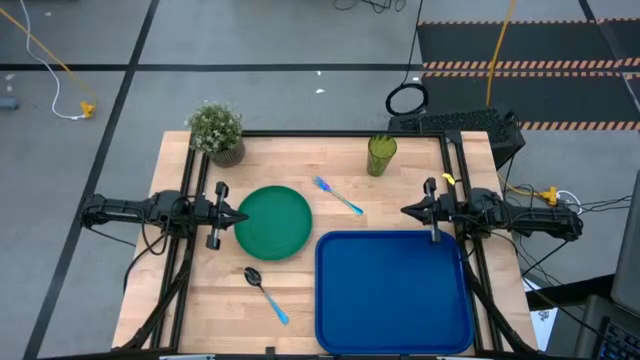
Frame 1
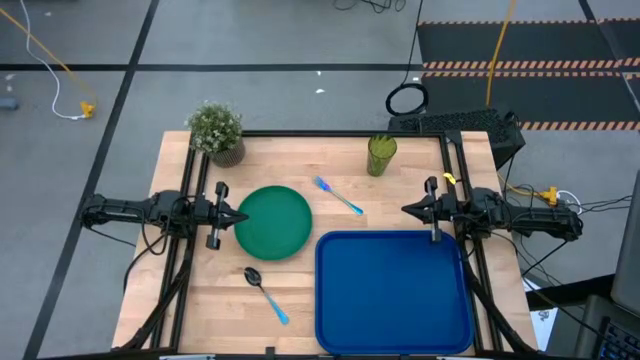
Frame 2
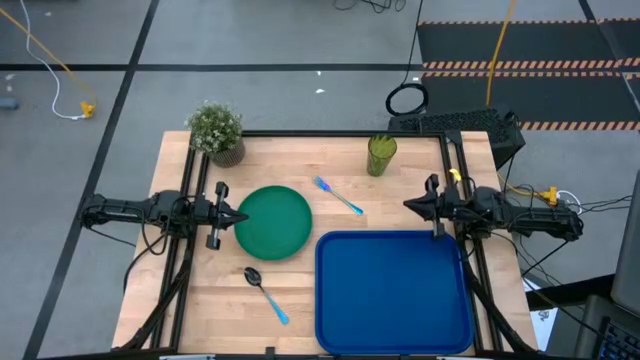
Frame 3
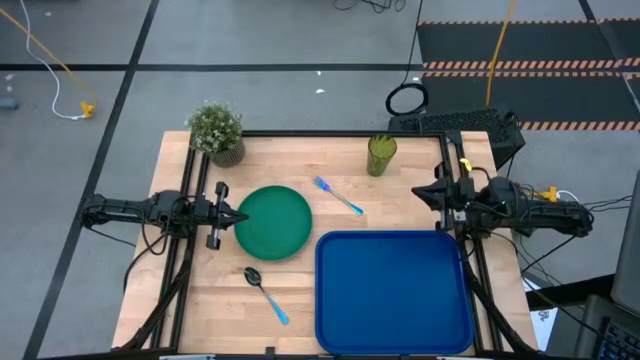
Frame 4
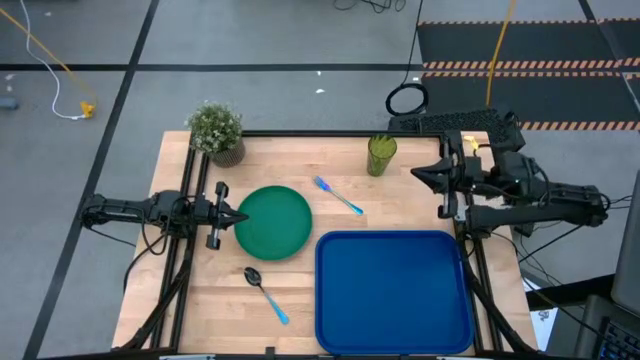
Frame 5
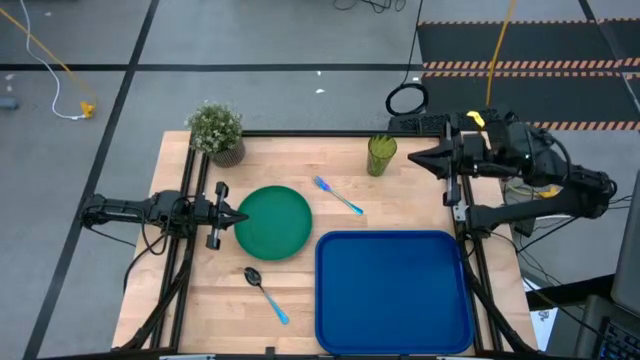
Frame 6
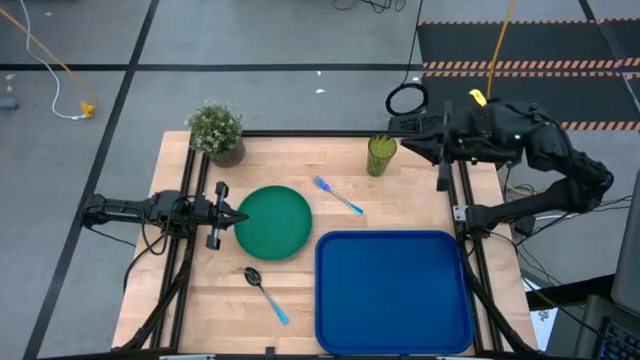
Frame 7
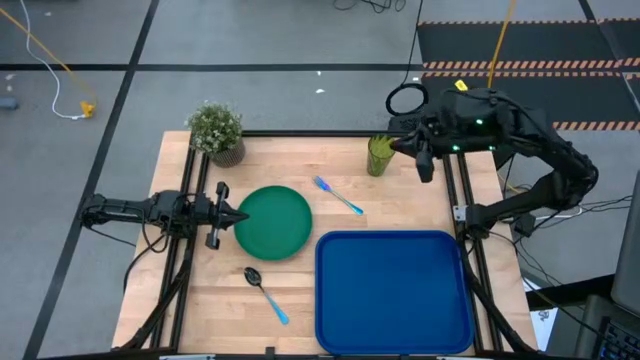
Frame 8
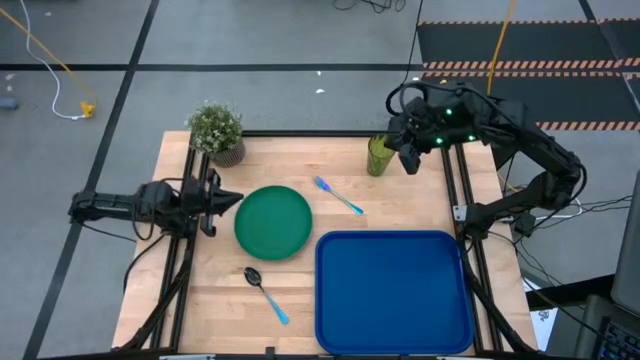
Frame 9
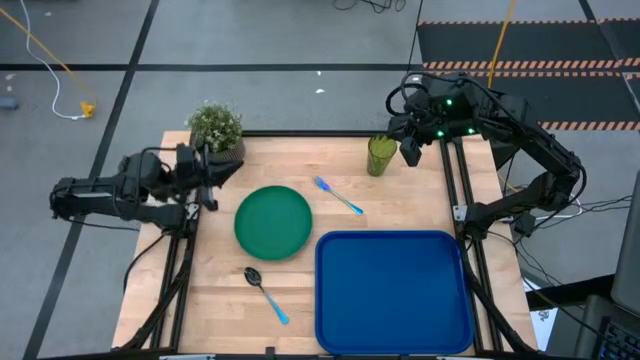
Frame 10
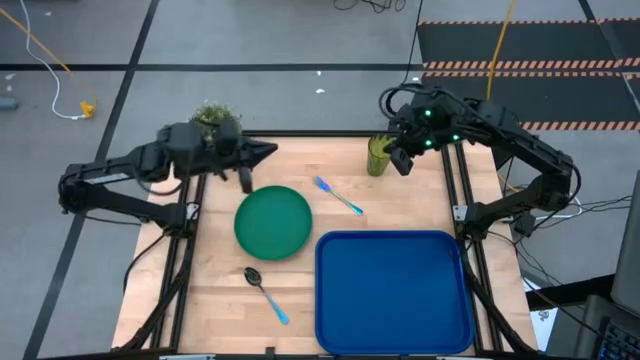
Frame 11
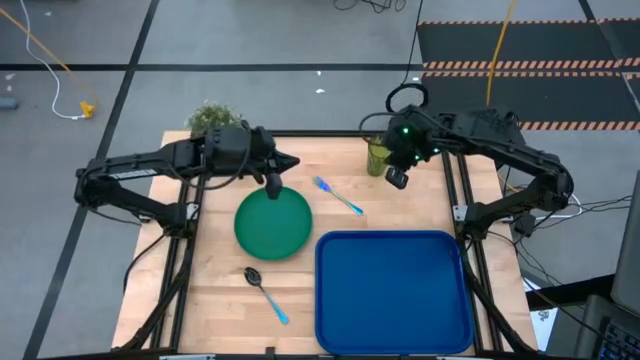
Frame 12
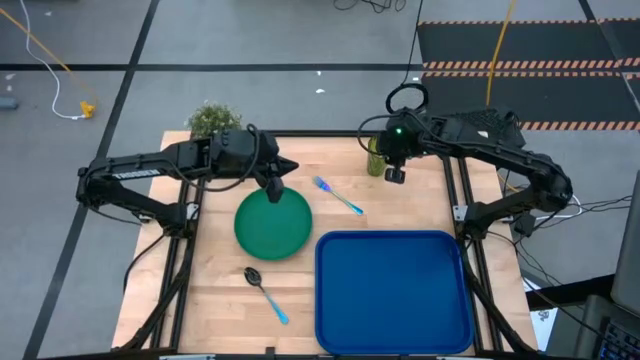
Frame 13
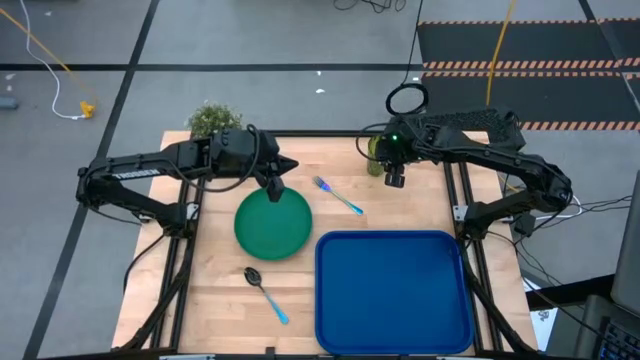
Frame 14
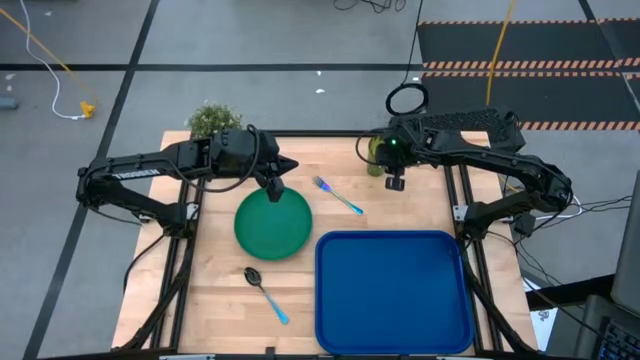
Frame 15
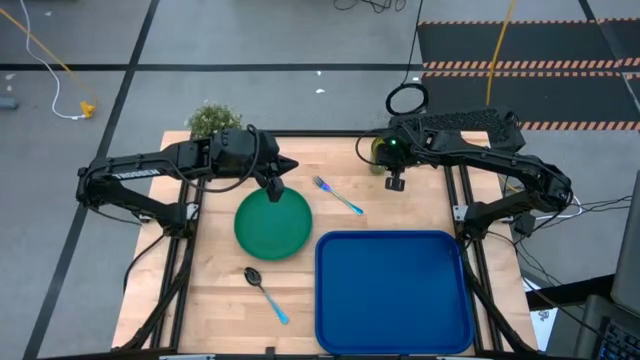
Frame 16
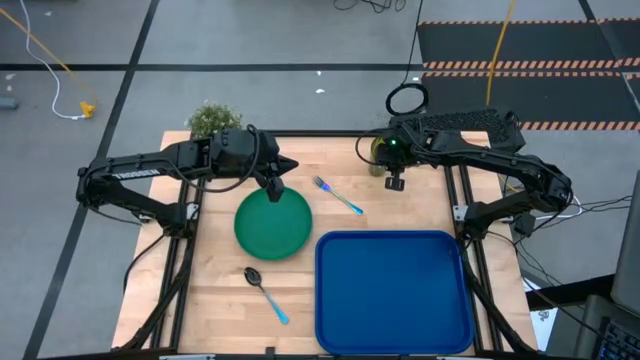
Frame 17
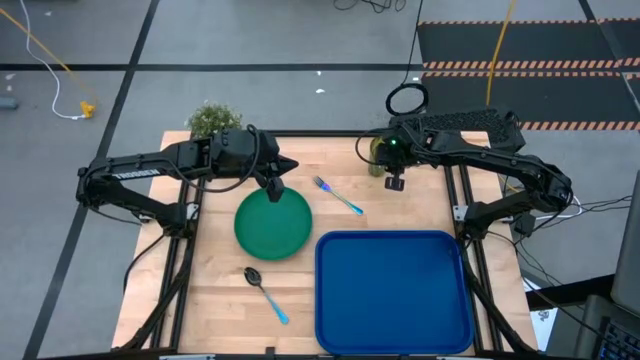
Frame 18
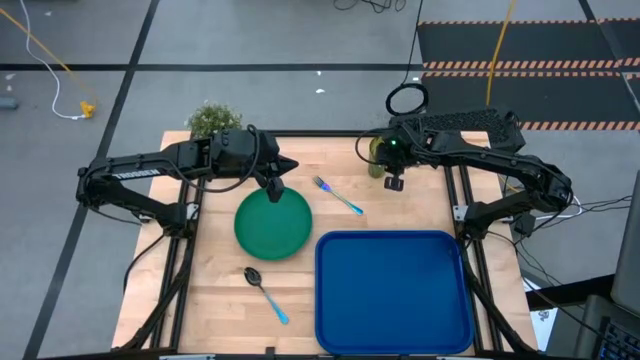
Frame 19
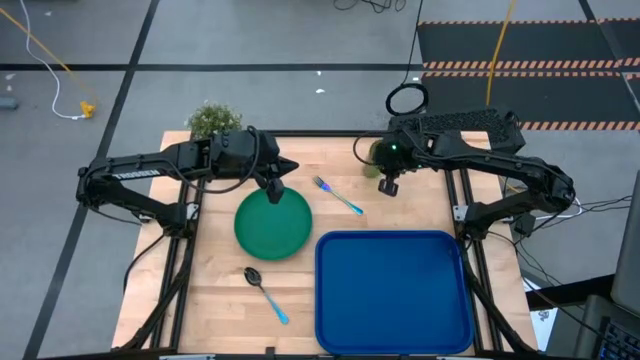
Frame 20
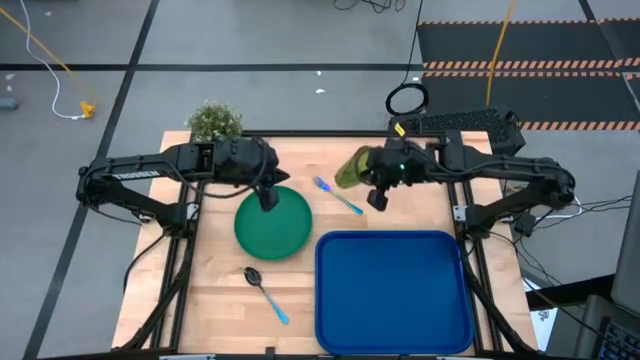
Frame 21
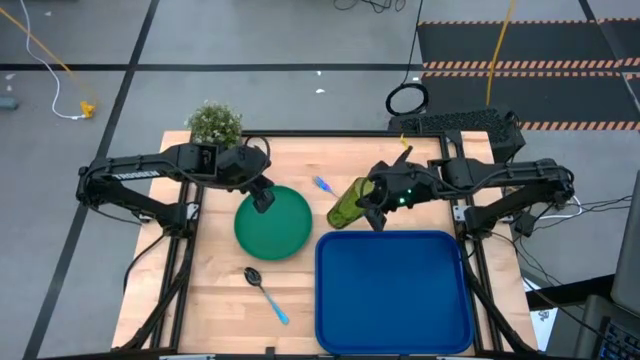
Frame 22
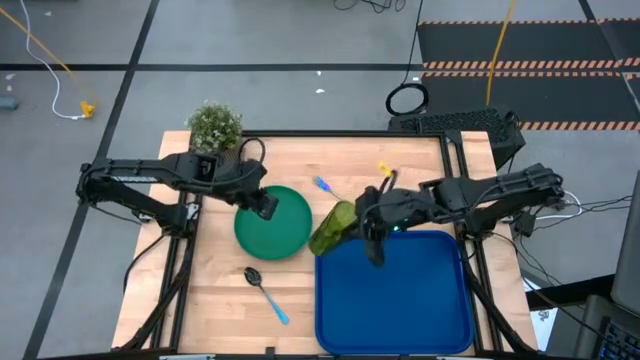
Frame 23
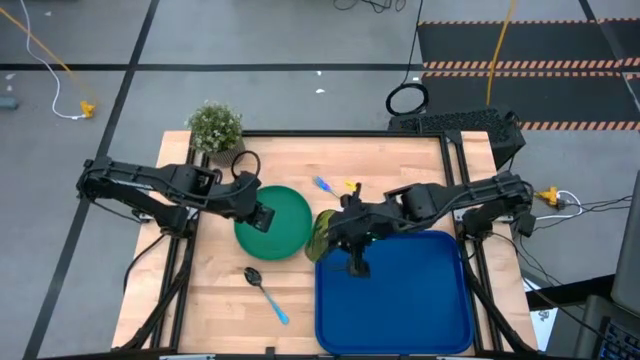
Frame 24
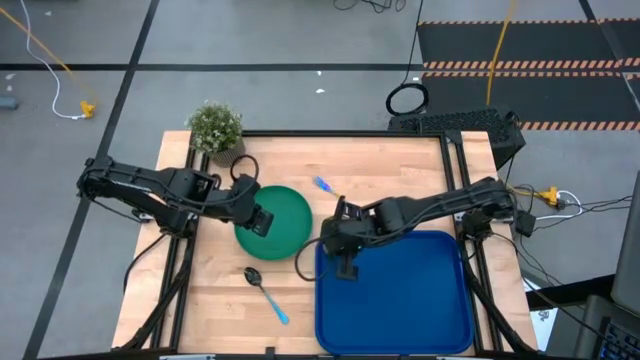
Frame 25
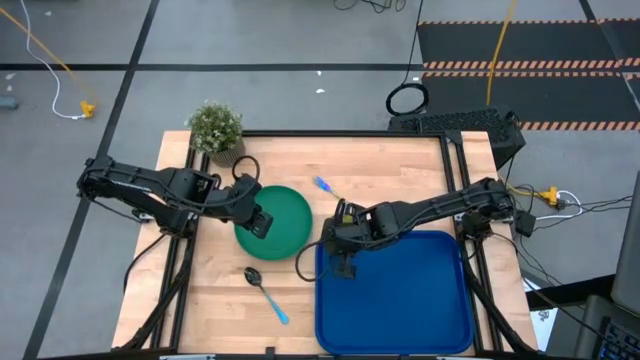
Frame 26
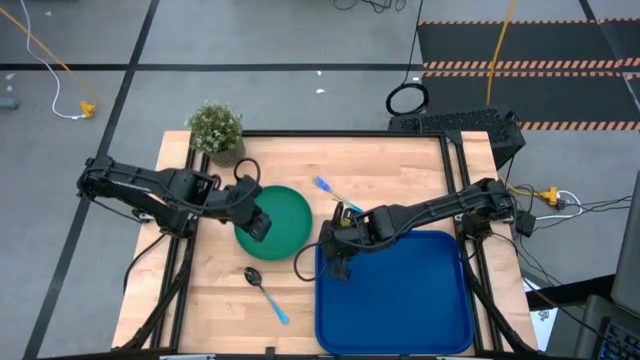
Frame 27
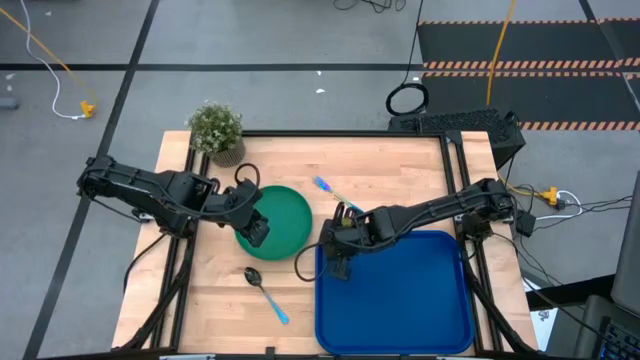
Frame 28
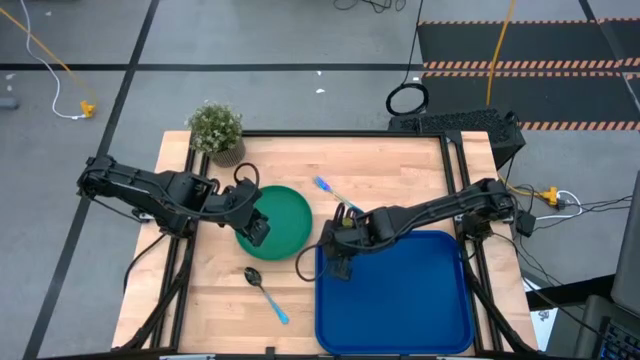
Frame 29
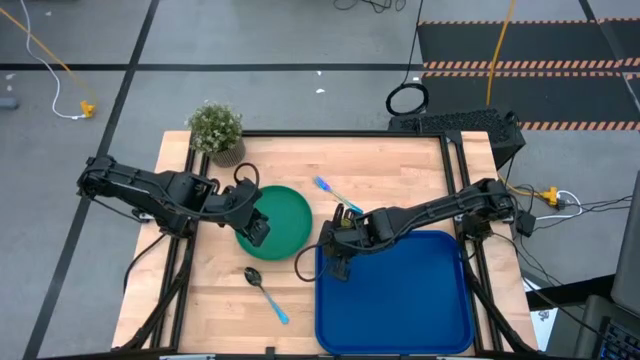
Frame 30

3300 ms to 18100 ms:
Task: Pick and place plate/cup/fork/spoon on tray
Put the green cup on the blue tray

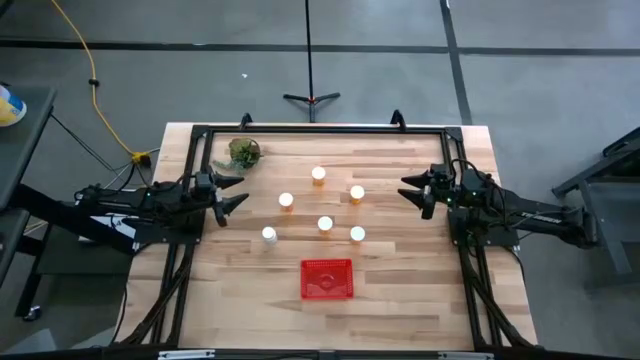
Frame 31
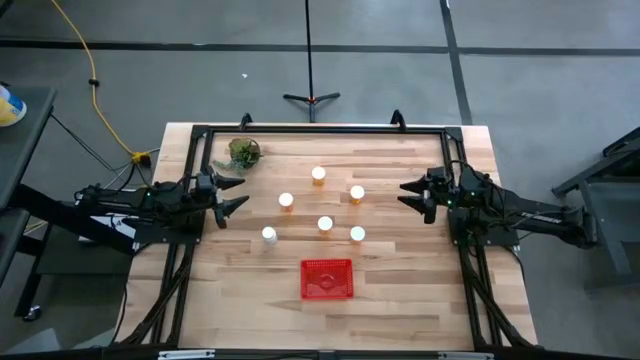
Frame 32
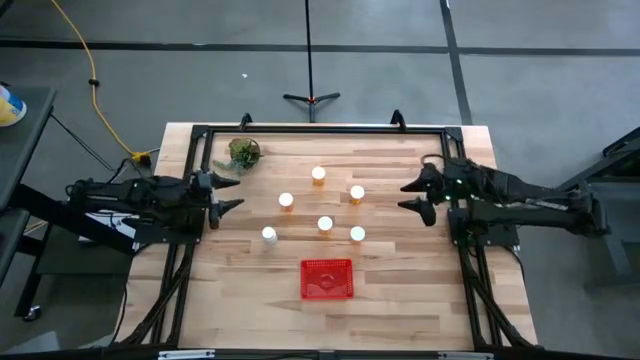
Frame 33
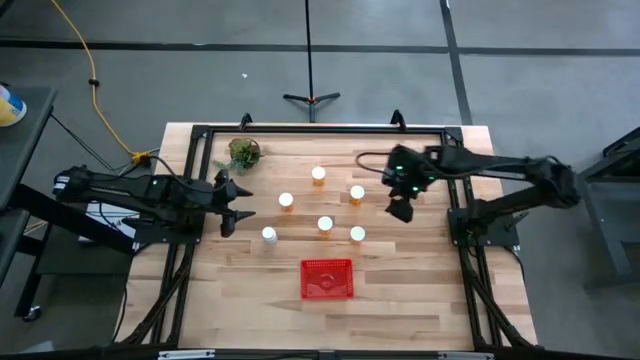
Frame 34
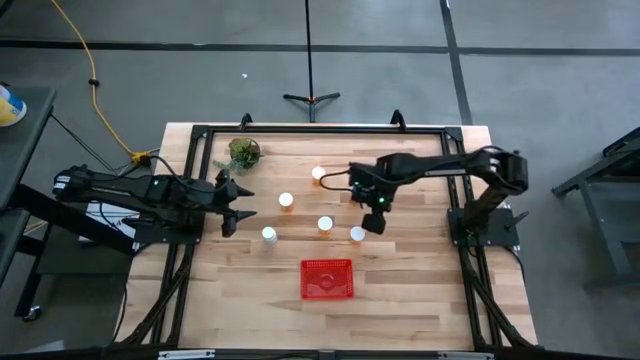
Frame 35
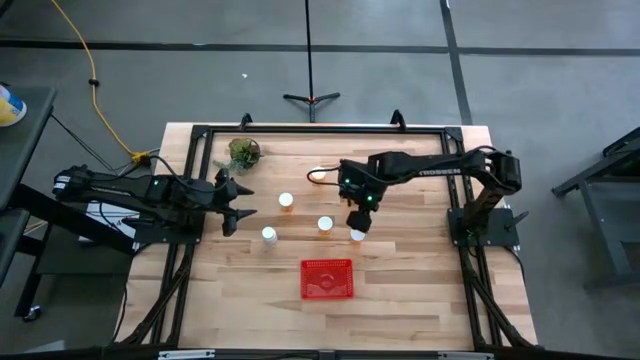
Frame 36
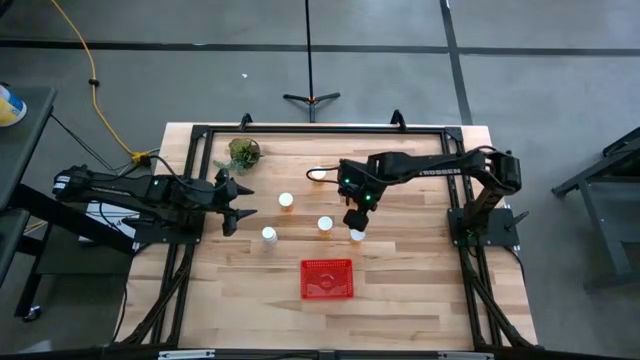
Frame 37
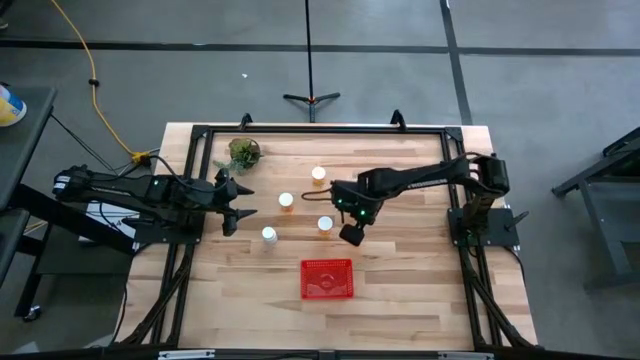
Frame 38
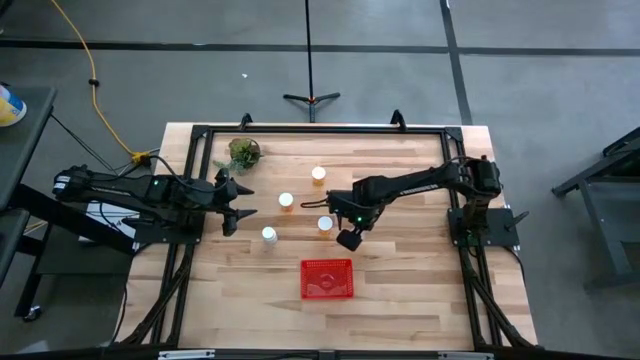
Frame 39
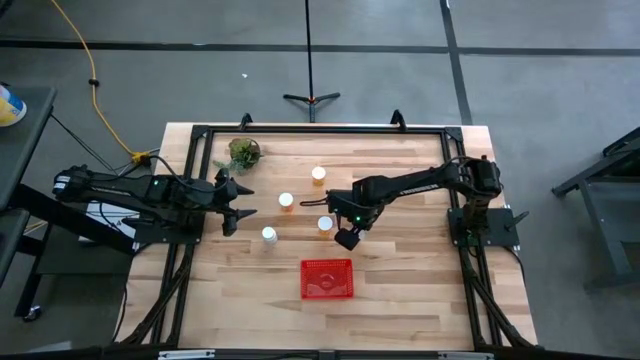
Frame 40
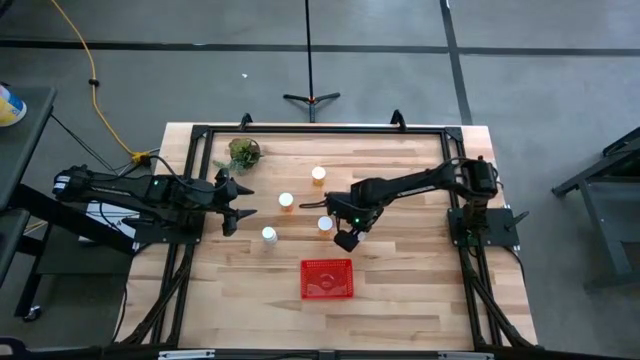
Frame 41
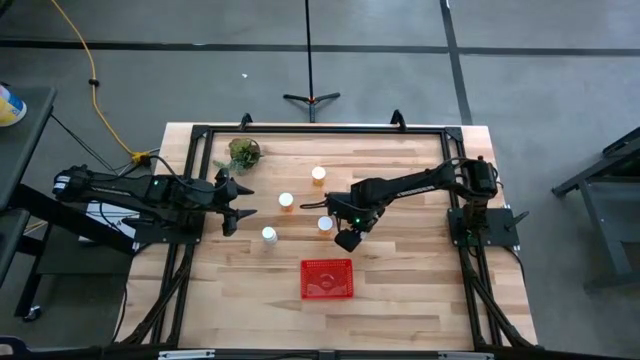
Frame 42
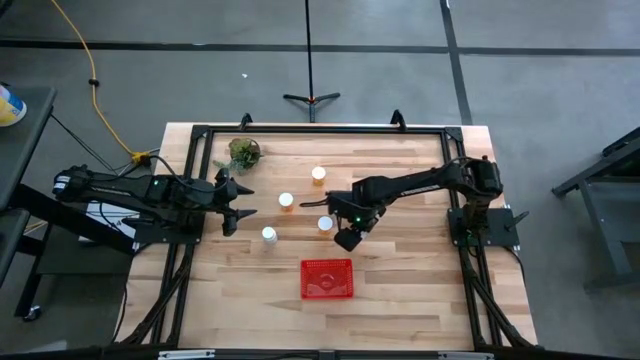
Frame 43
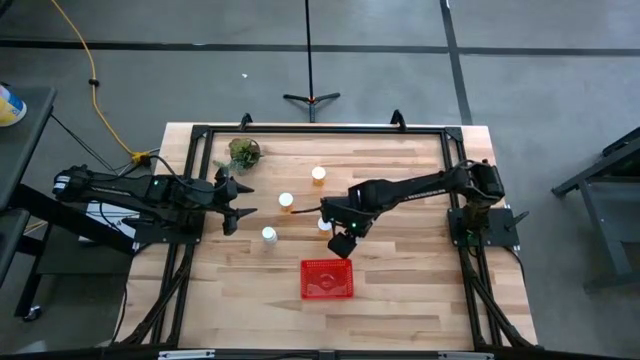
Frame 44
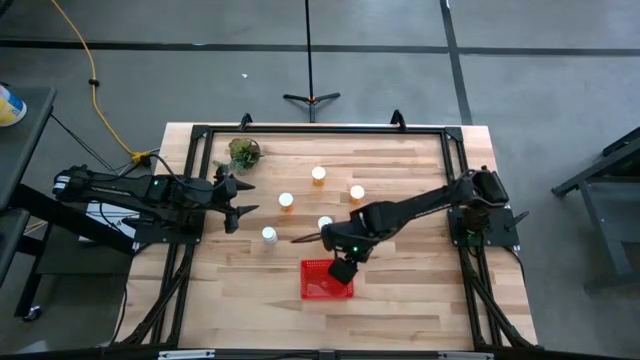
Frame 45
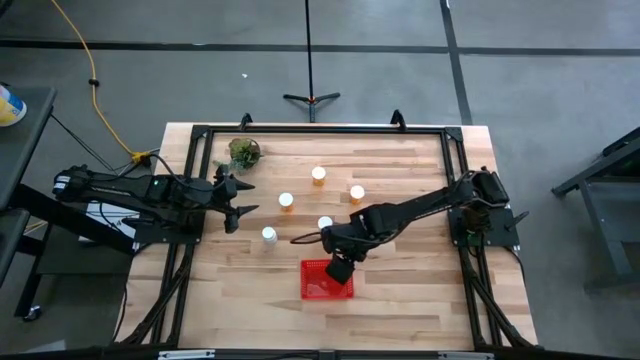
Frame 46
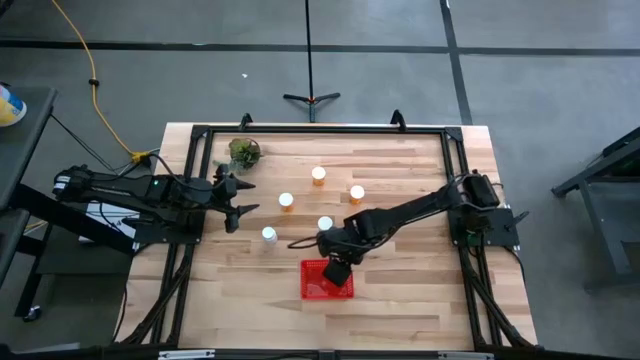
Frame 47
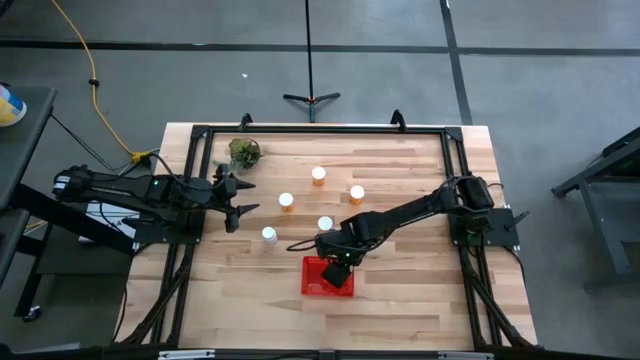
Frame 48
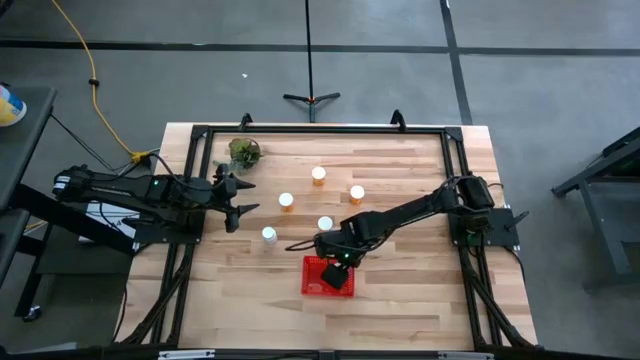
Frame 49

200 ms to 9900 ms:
Task: Pick and place pill bottles into a basket
Put the orange pill bottle into the red bin
